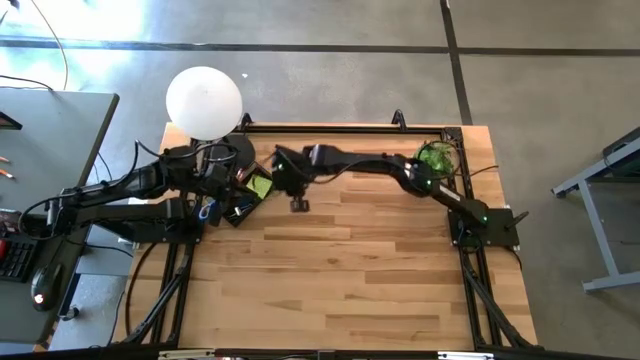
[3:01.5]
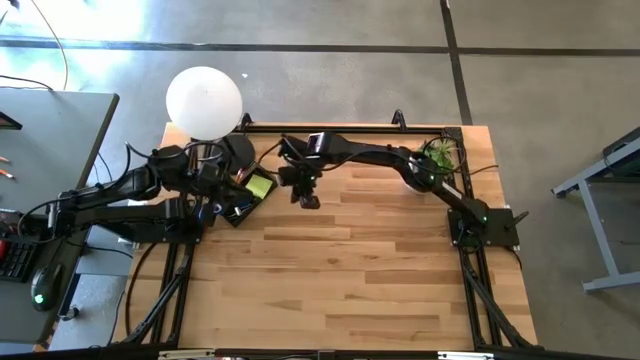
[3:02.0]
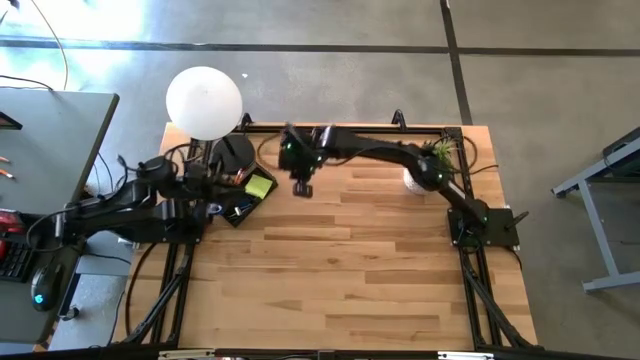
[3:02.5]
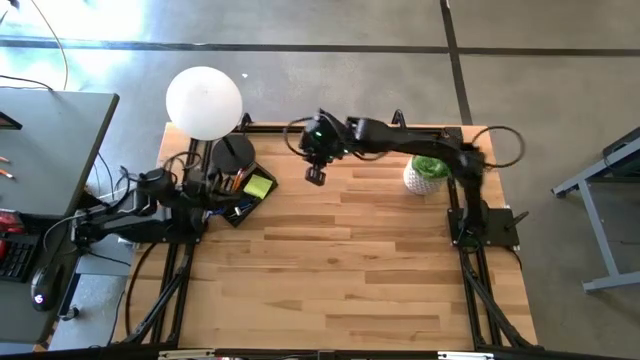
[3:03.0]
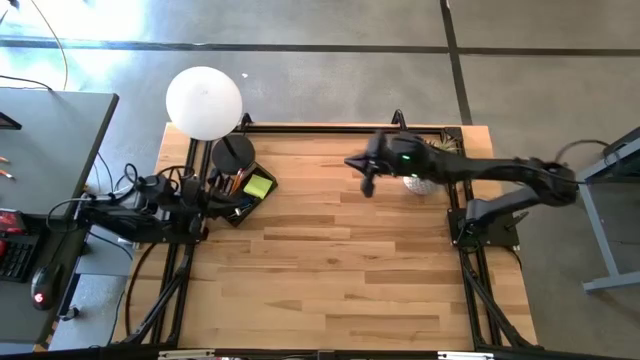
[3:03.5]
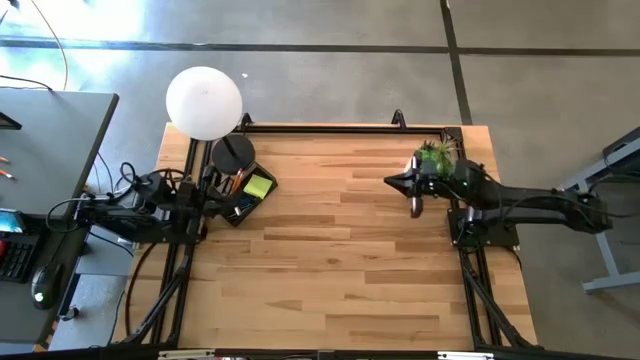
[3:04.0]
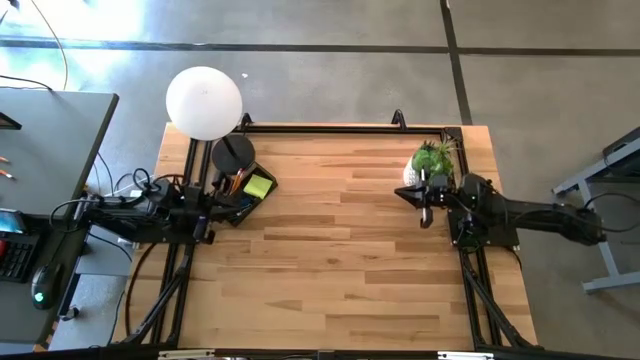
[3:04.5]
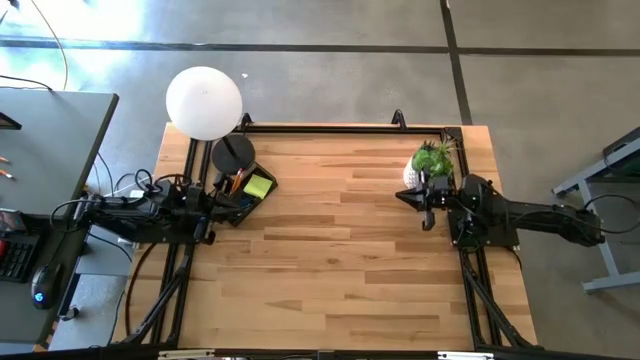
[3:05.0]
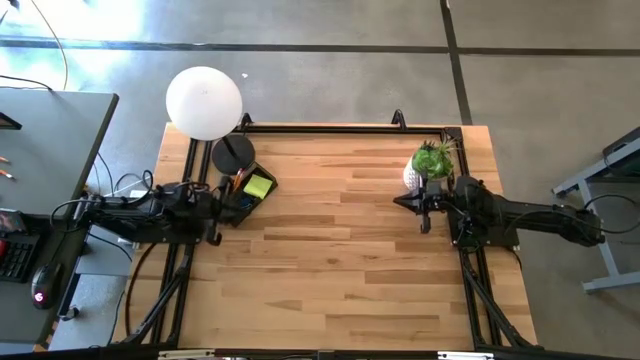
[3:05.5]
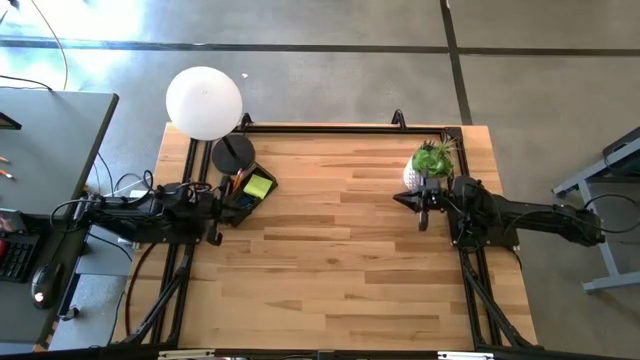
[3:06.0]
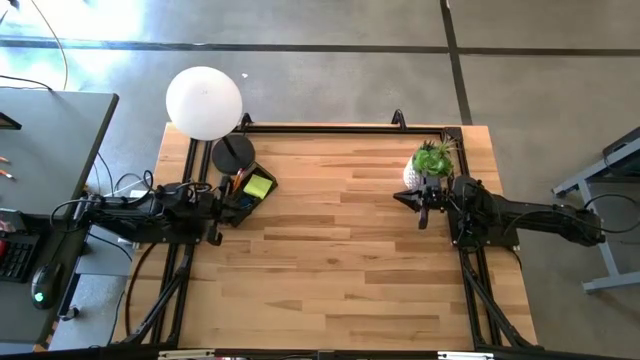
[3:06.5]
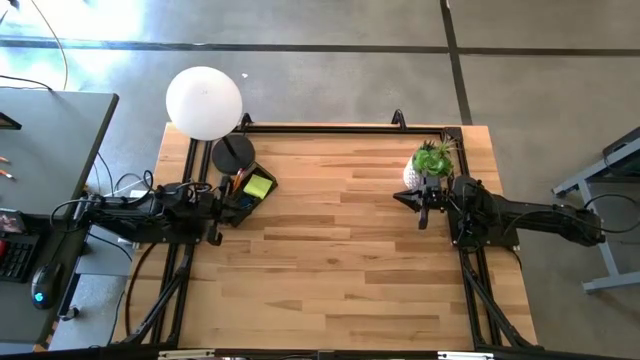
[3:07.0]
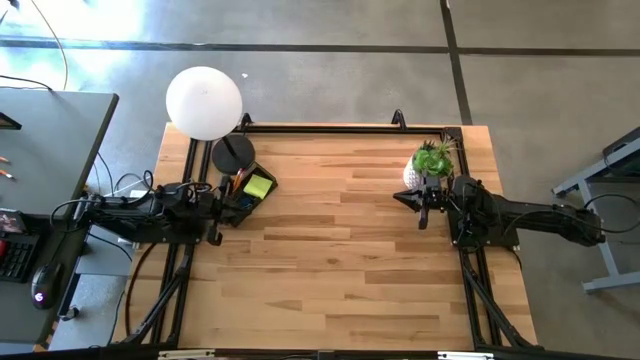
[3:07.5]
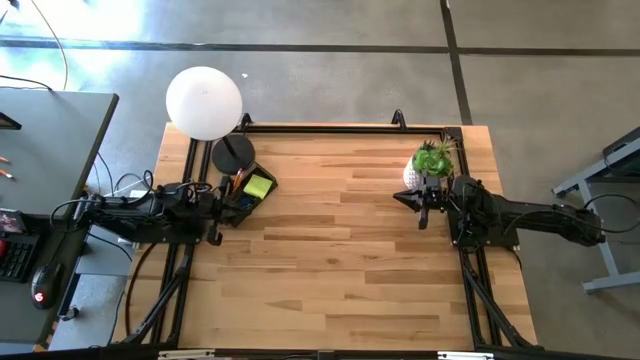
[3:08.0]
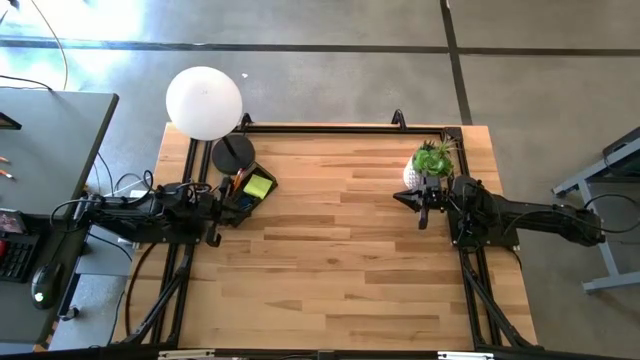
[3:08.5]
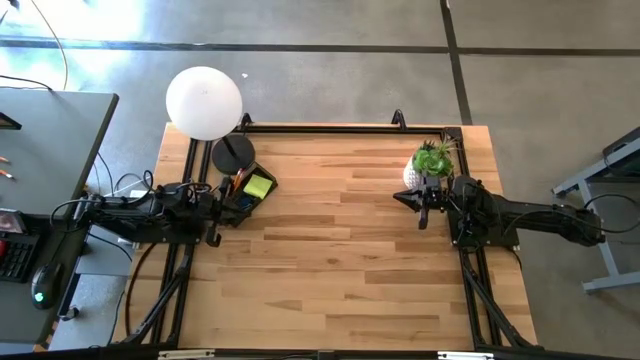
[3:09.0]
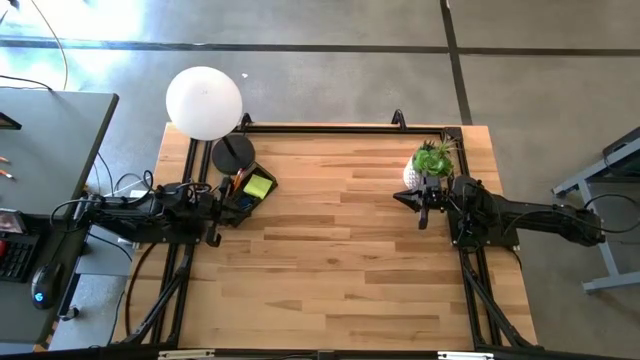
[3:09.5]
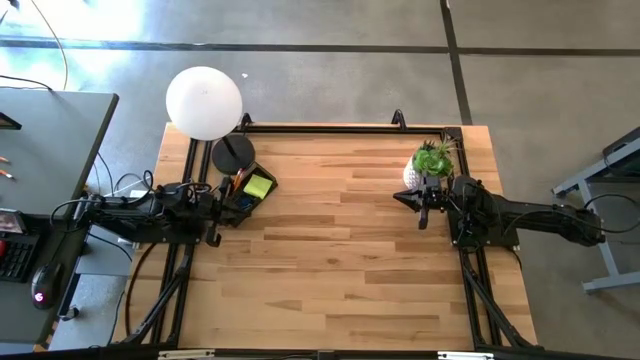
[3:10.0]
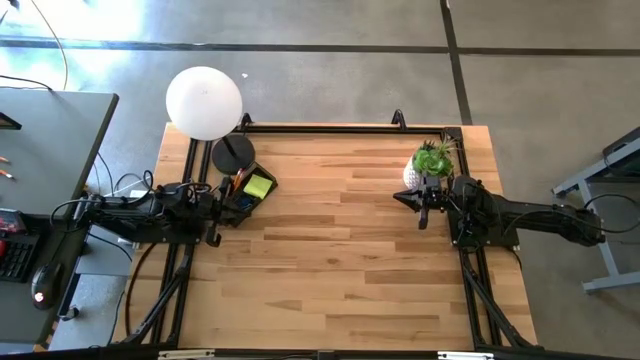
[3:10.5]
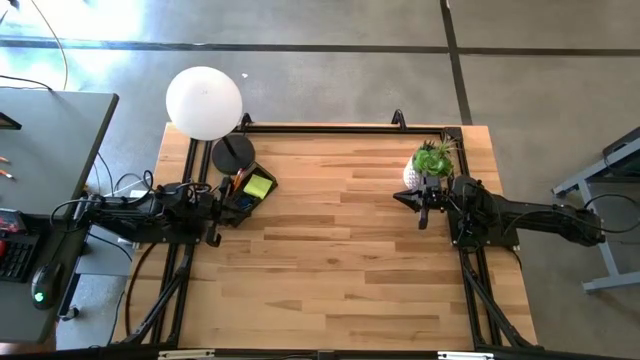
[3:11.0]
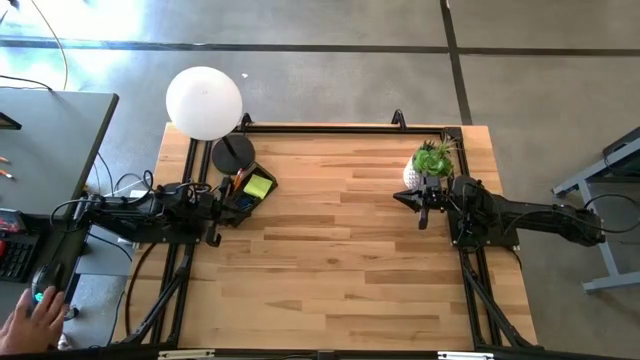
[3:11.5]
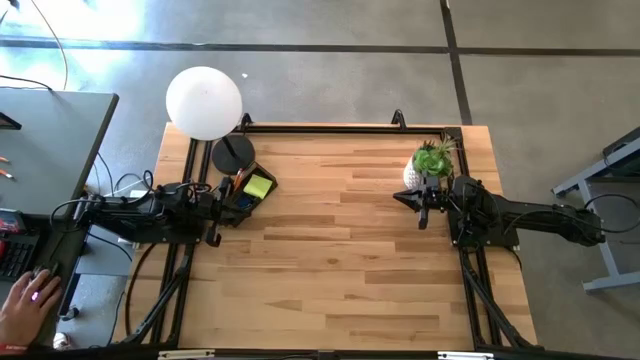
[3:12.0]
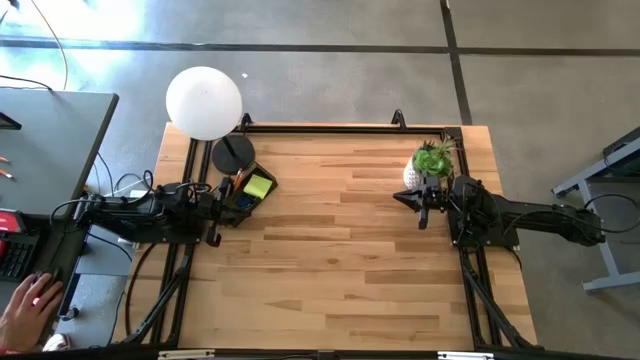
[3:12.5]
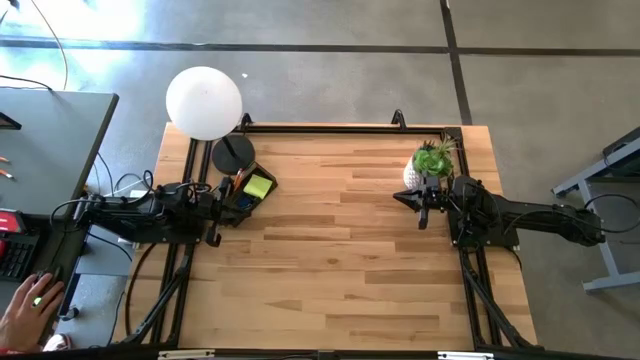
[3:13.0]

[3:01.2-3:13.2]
Task: Pick and place office supplies into organizer
Return to Home Position

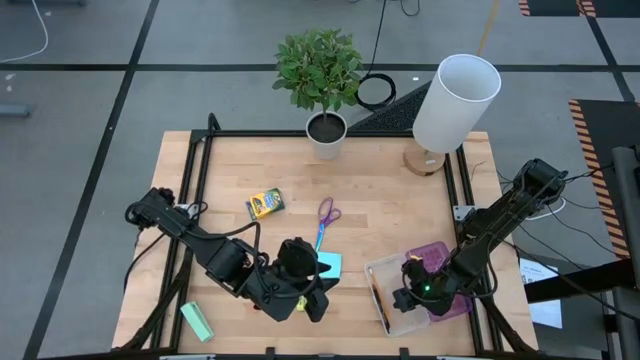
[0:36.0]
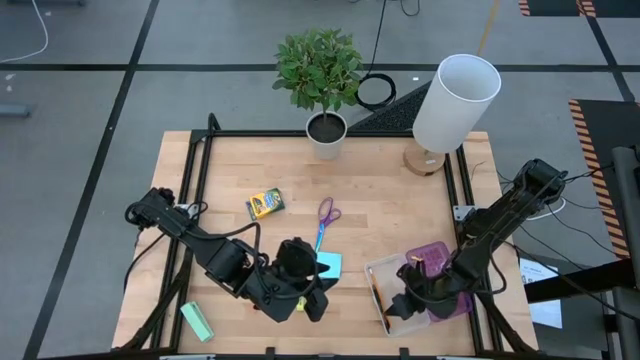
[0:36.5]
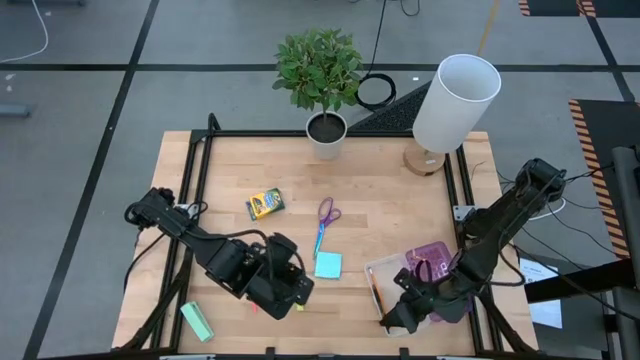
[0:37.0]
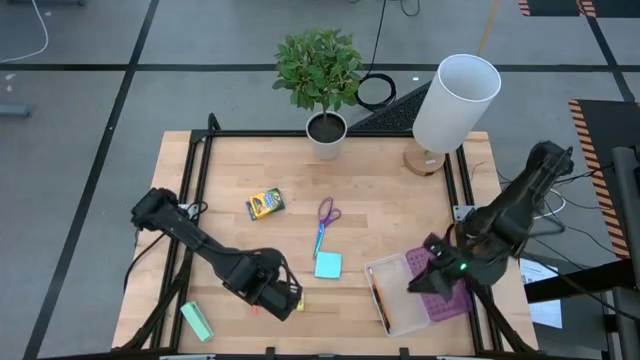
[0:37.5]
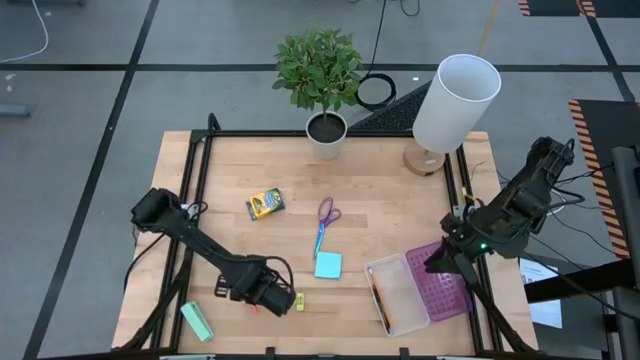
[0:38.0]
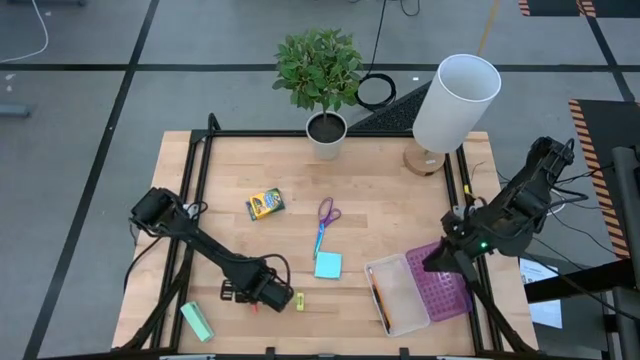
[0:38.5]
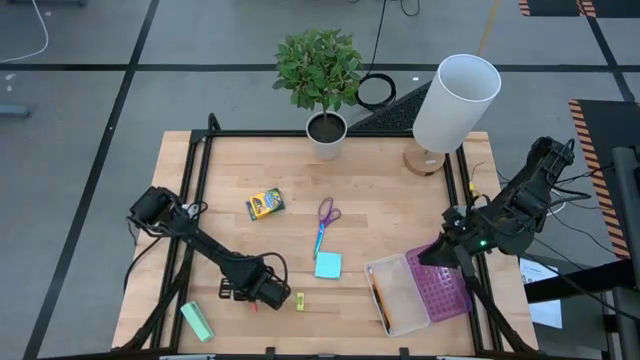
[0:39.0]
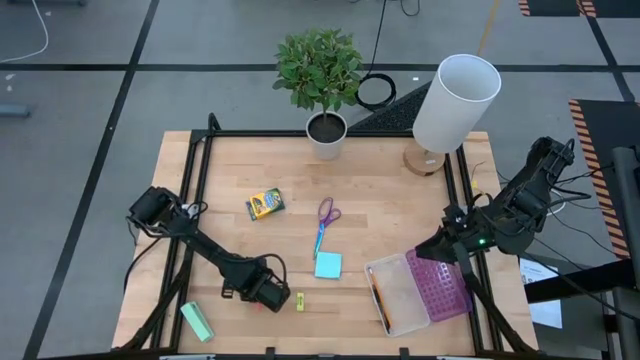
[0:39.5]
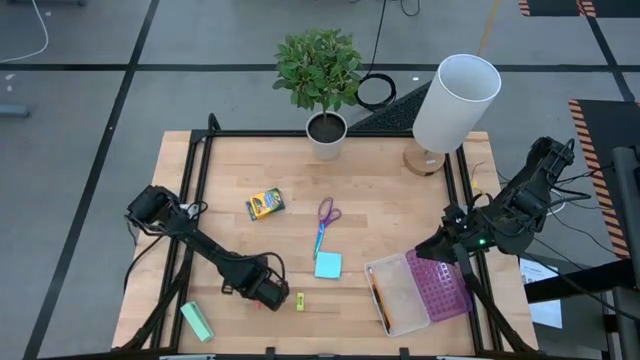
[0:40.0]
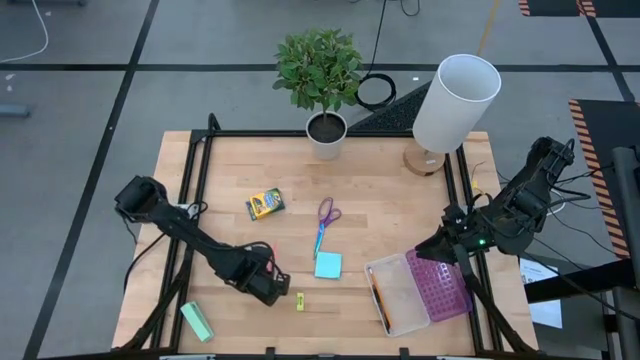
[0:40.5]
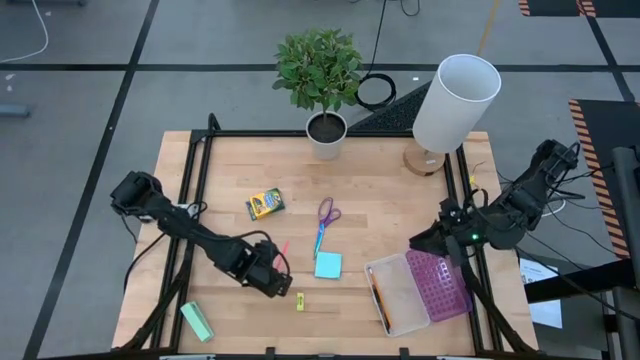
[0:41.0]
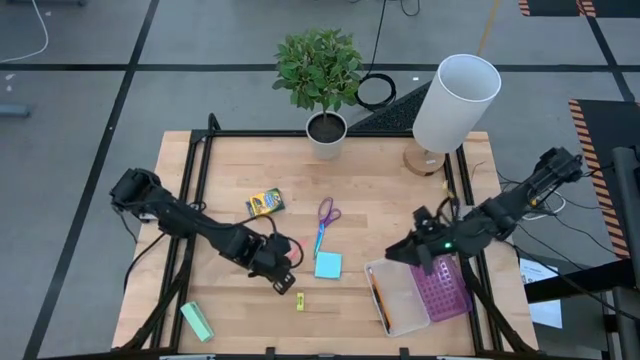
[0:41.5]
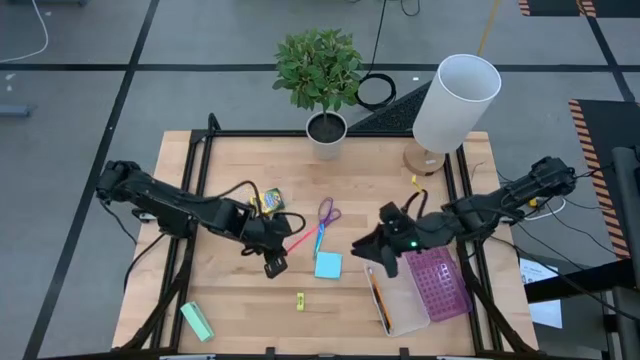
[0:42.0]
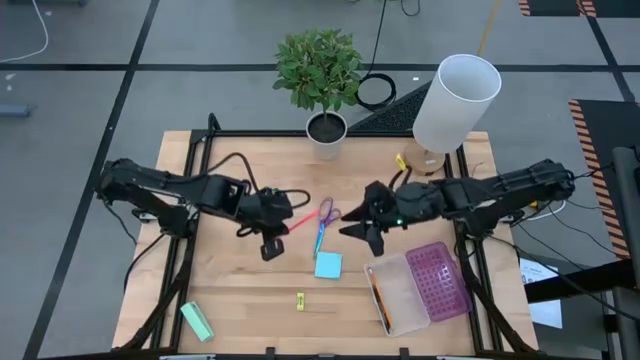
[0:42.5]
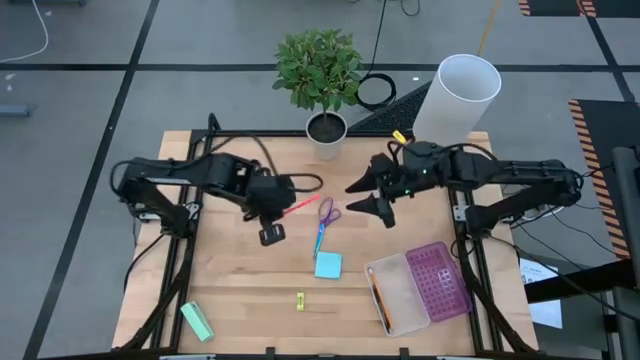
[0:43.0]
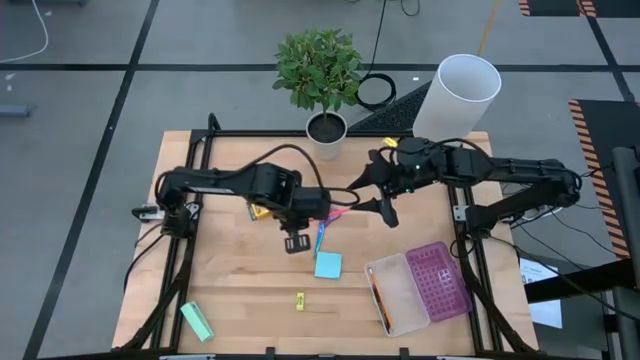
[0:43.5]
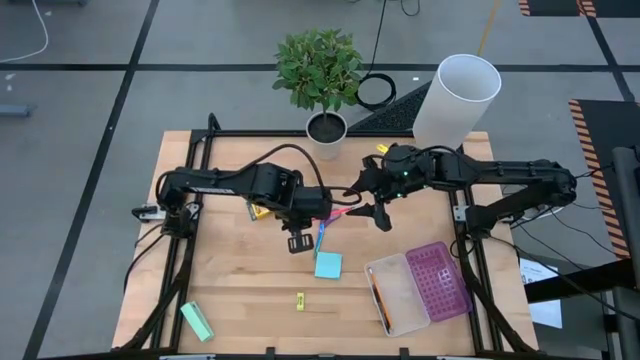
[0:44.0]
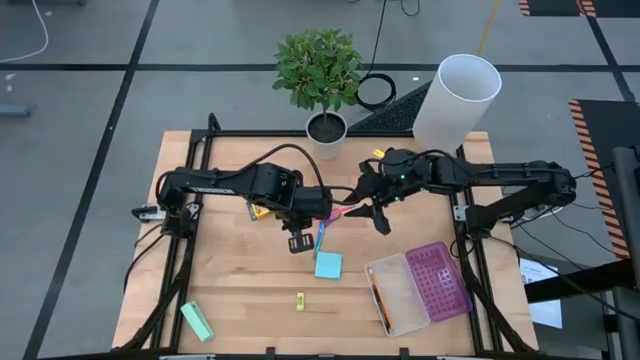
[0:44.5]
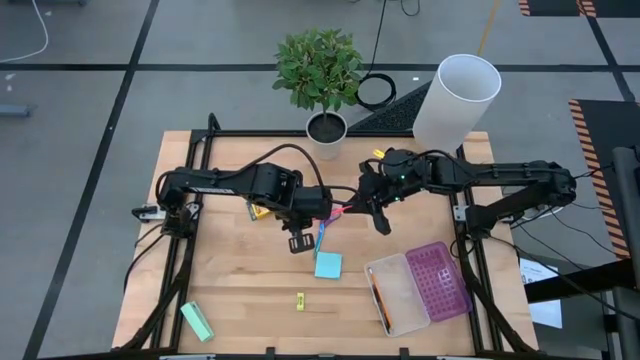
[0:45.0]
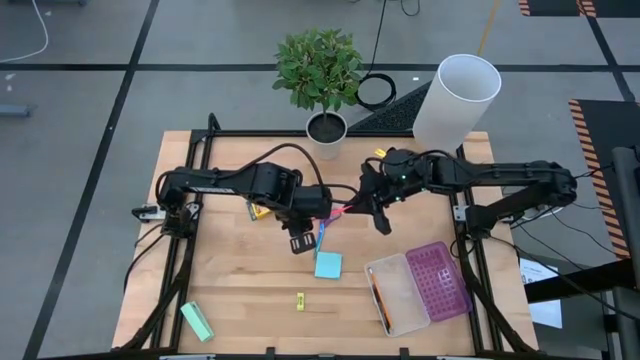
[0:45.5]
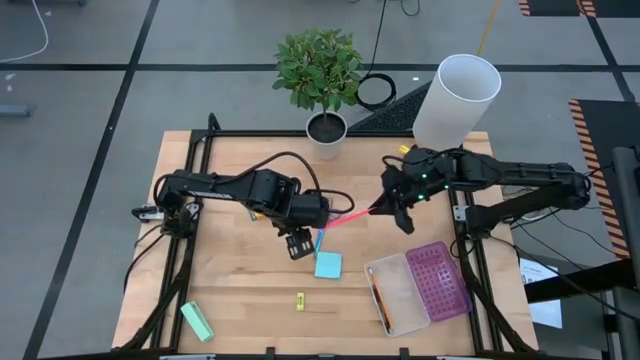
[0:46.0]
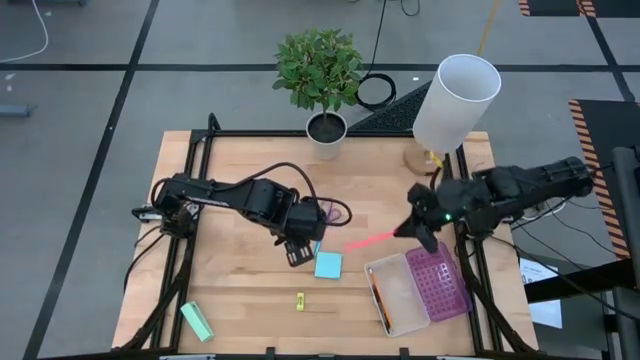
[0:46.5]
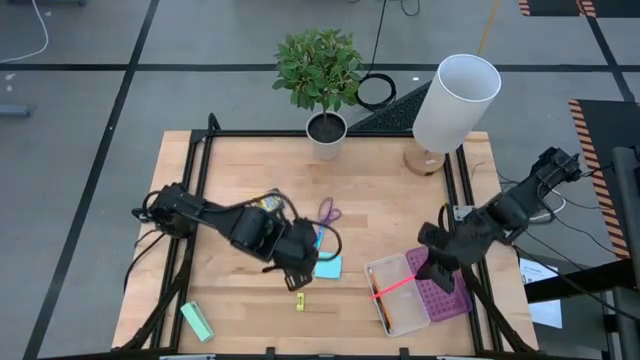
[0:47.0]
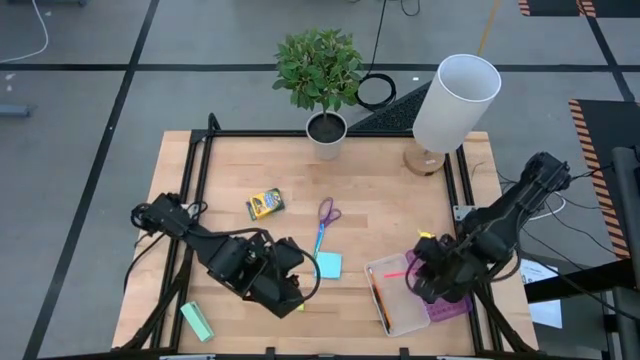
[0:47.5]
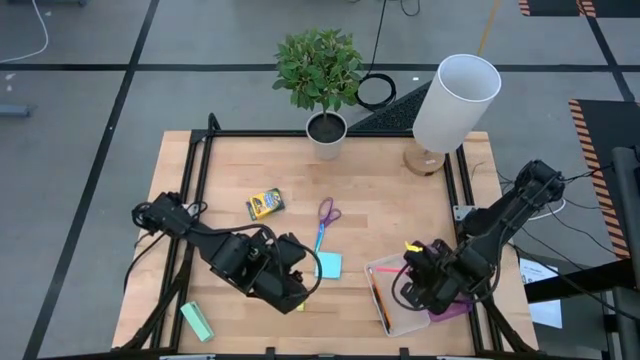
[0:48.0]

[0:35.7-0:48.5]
Task: Pack school essentials
Put the pink pencil into the purple supply box
